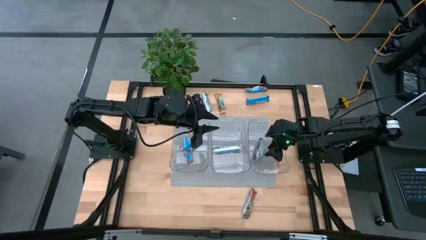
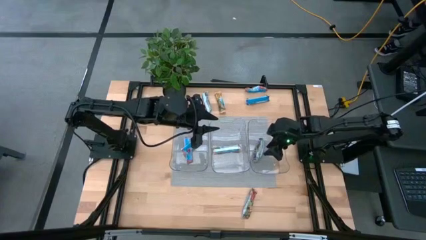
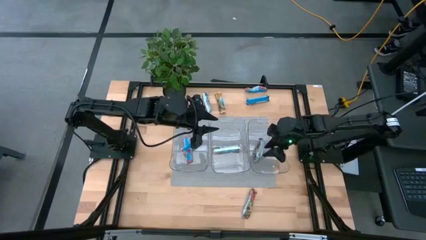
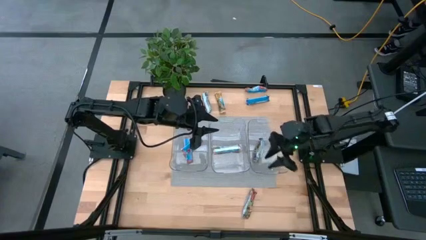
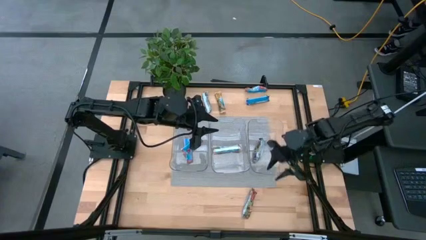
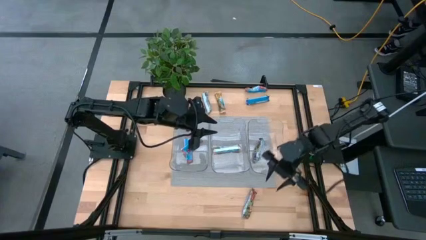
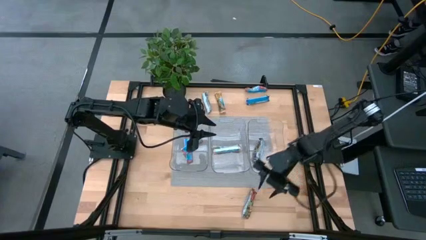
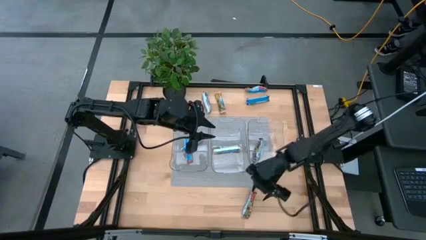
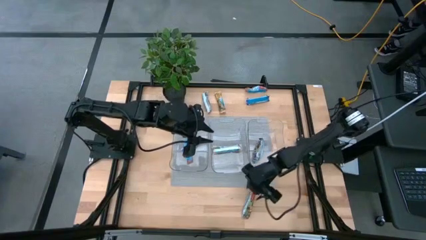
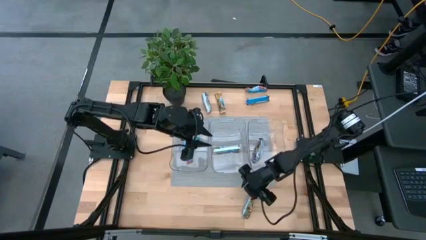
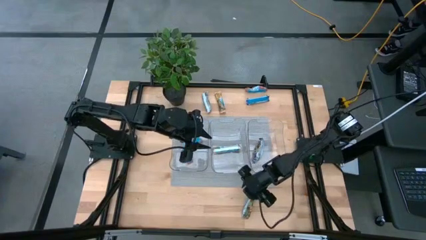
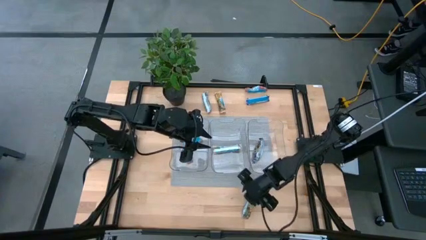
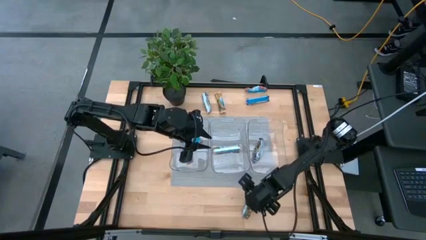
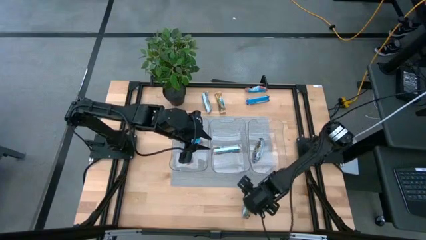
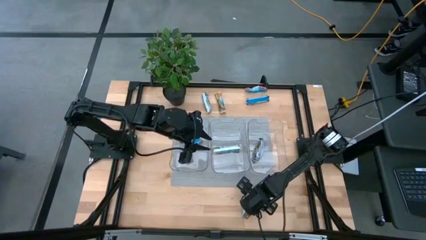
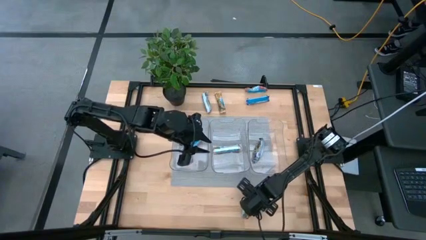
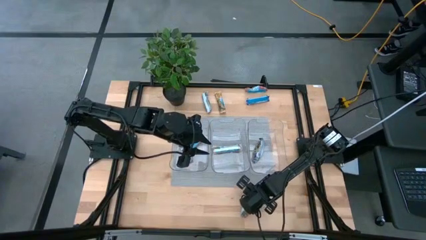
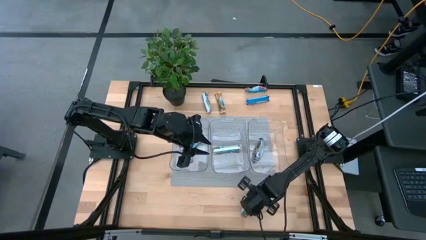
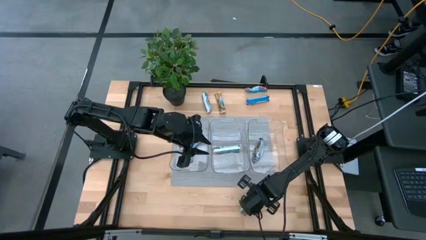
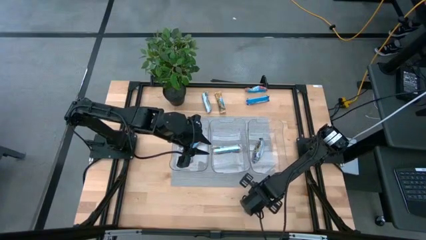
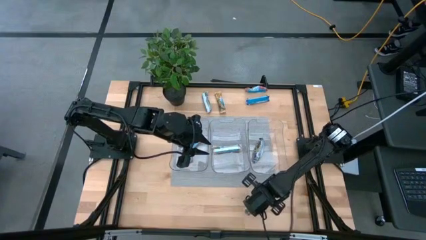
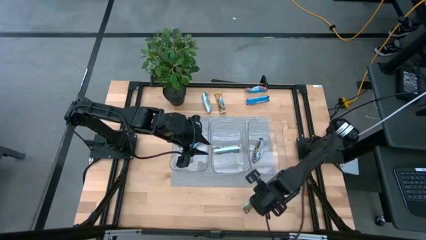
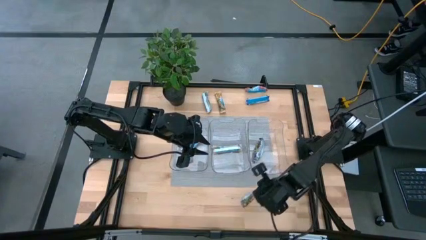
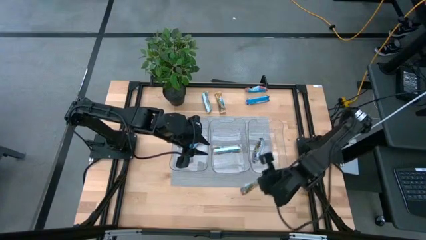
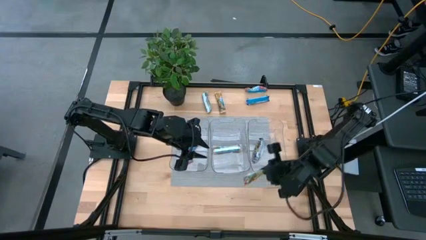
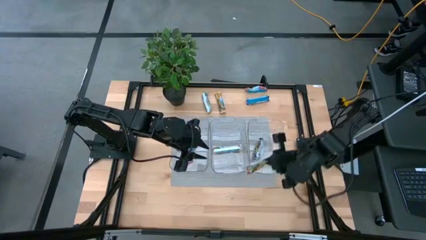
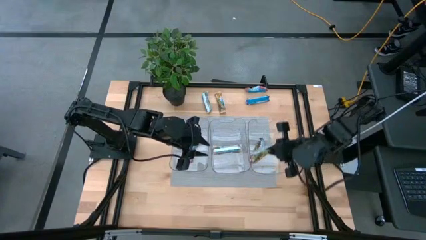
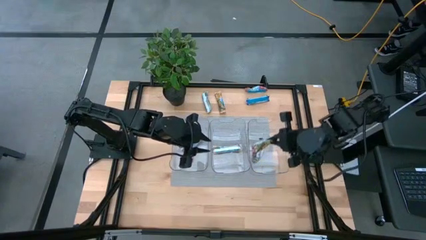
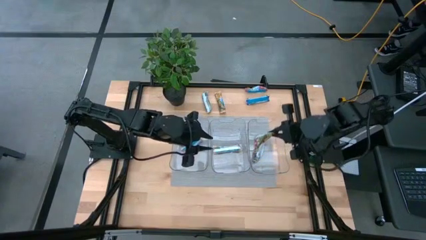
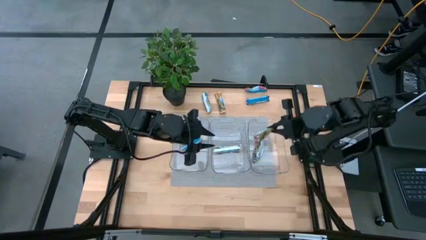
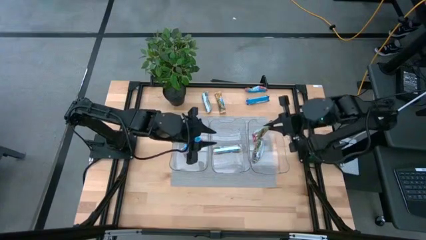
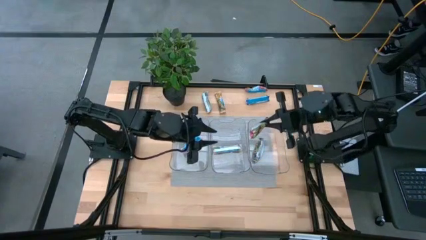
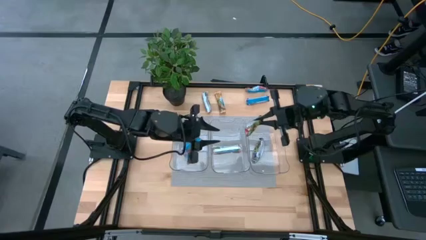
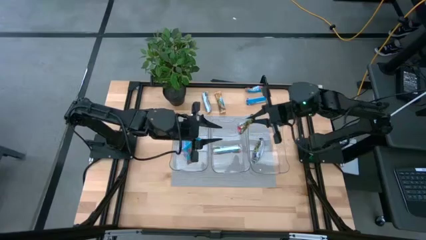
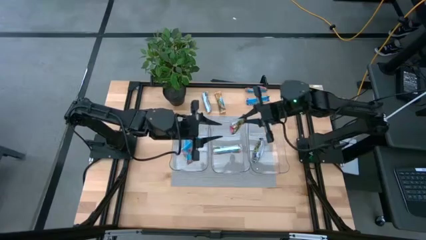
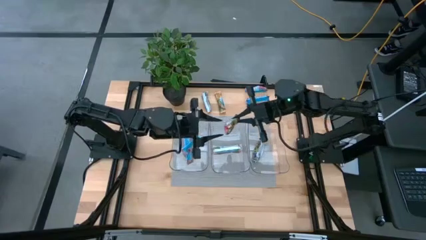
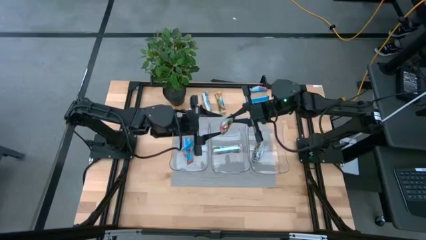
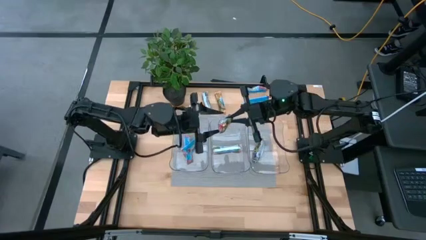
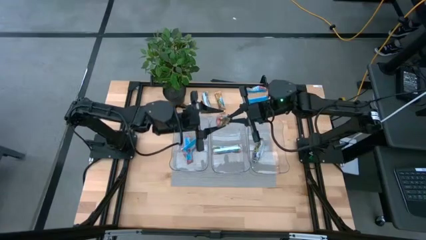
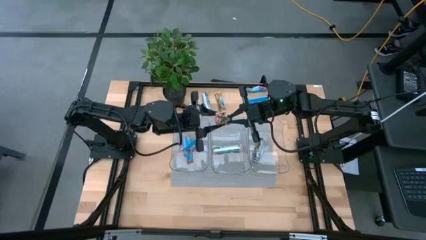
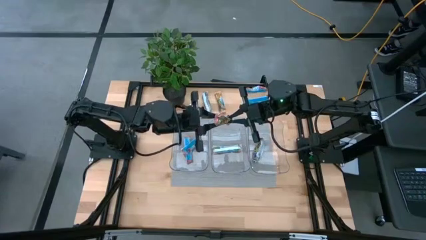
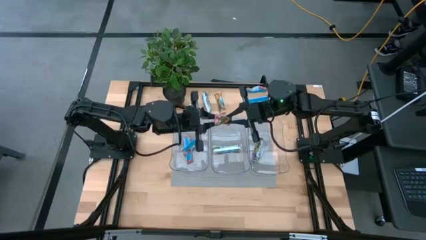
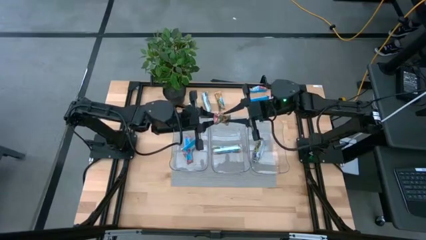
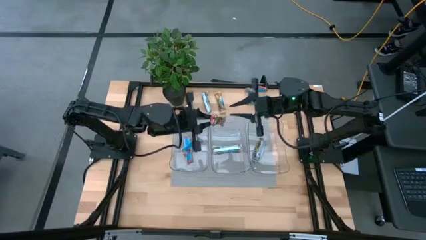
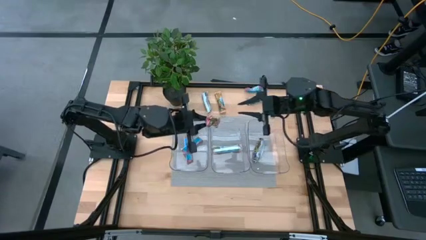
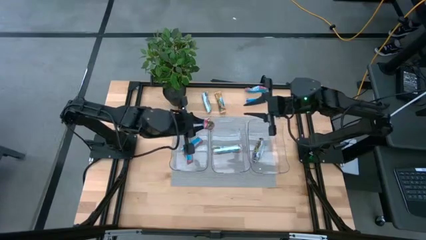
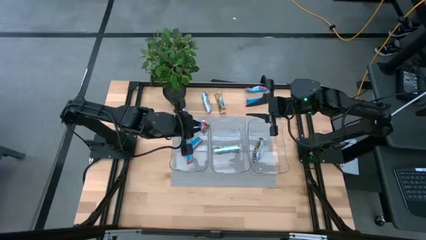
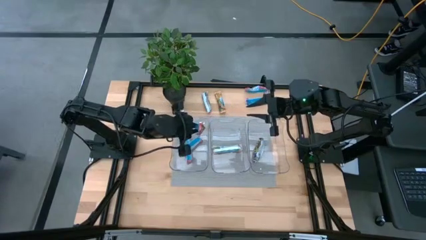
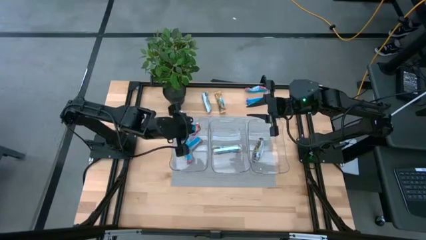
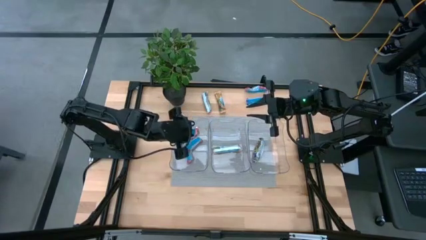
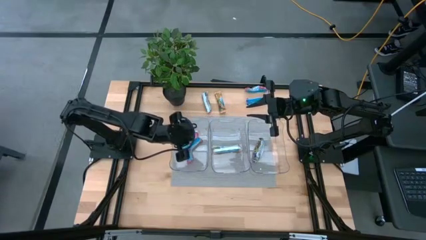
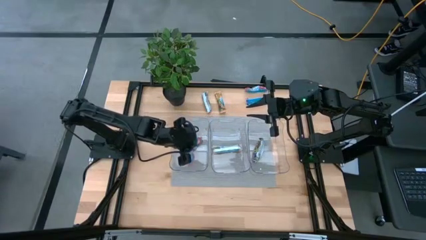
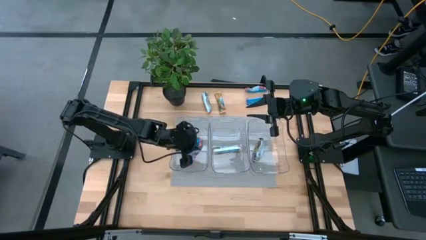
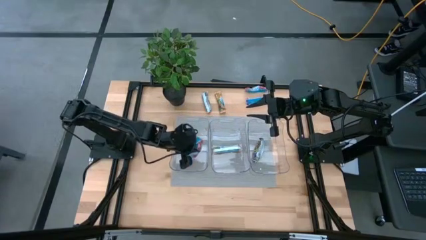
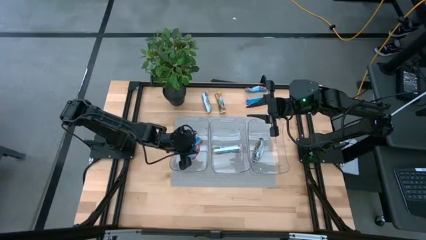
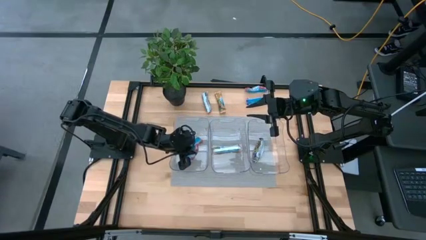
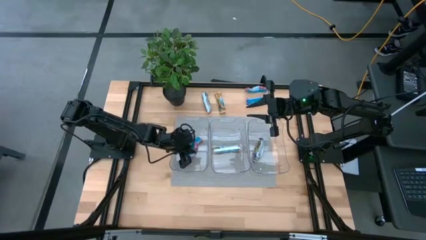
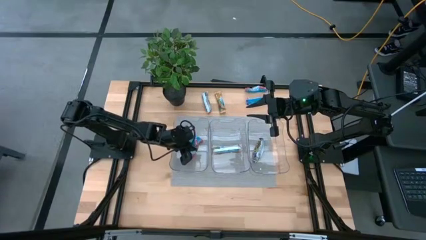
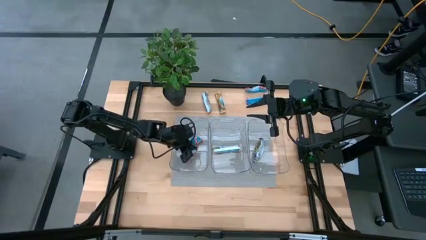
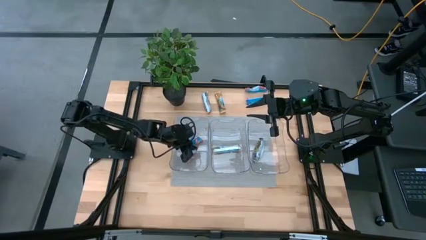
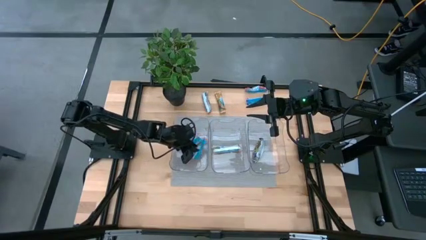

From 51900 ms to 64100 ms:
Task: Pick and place Granola Bars by type
Put the red granola bar into the left transparent bin

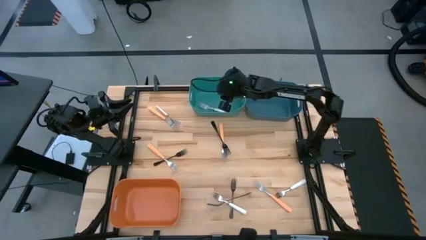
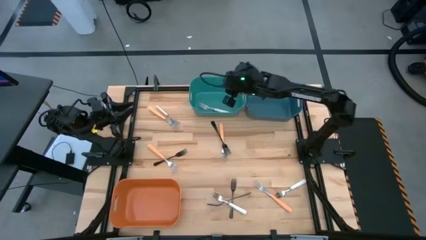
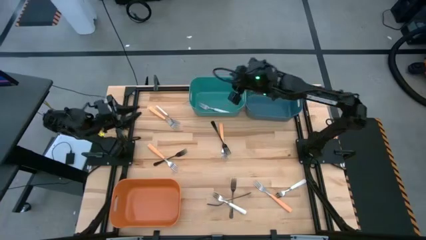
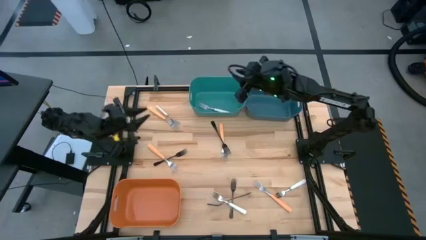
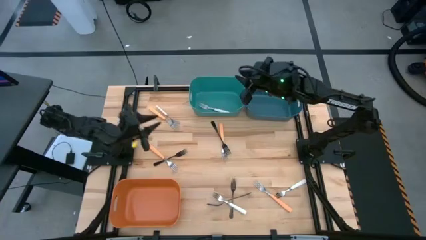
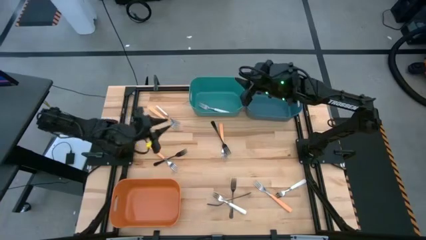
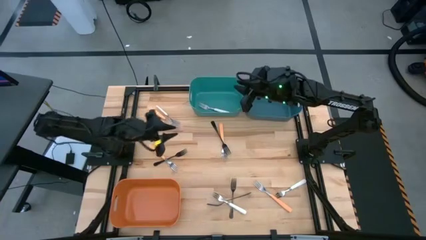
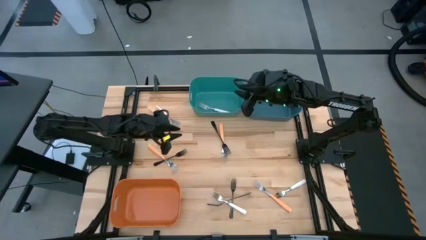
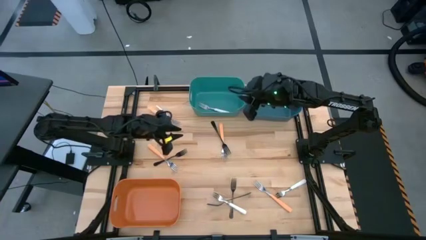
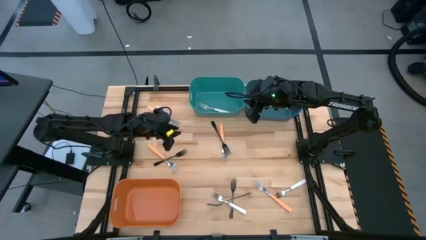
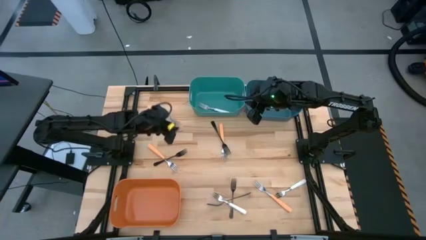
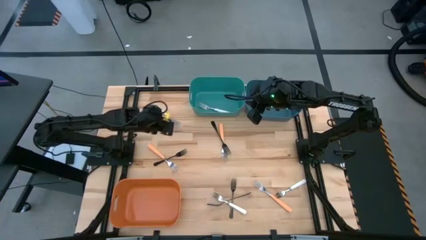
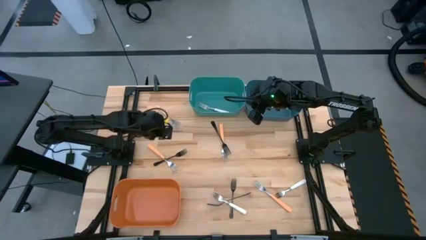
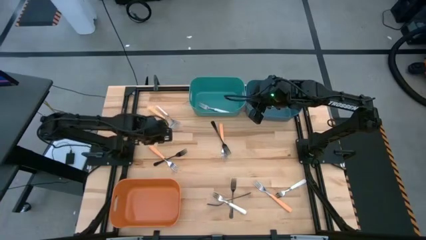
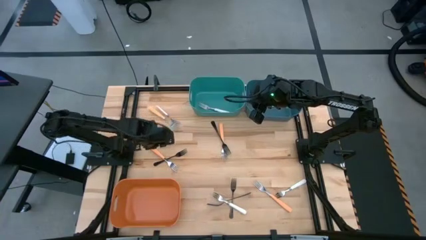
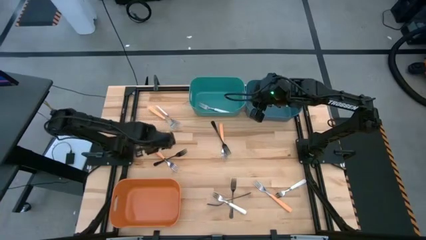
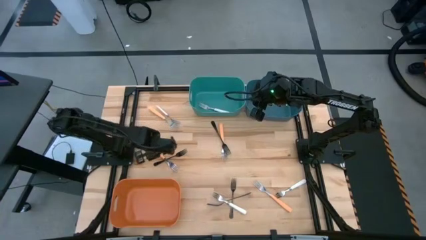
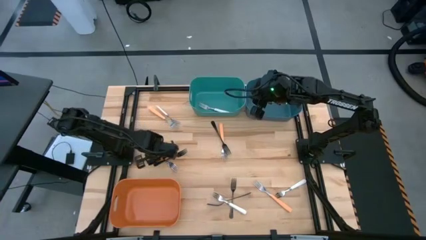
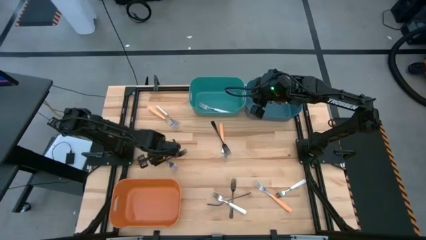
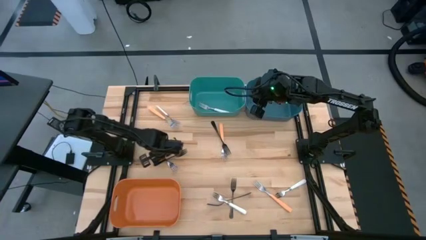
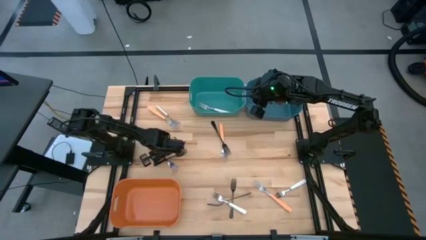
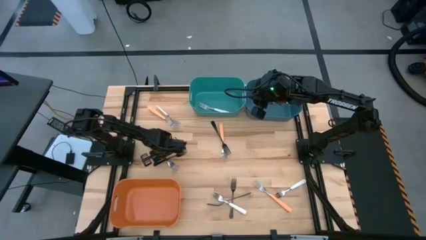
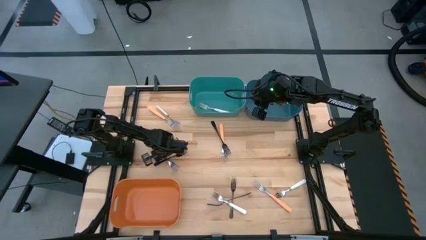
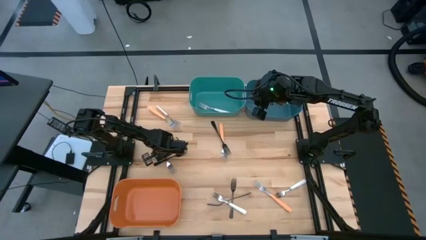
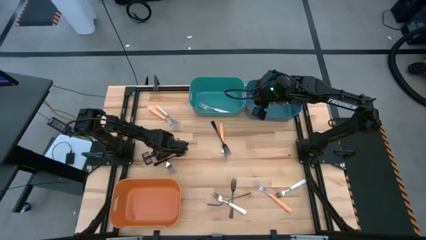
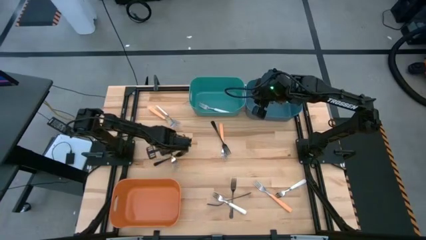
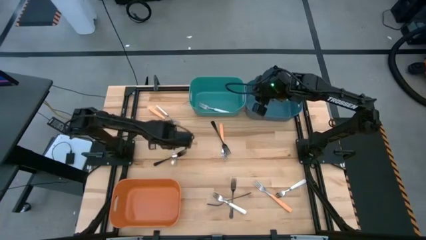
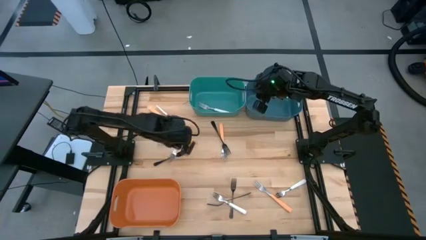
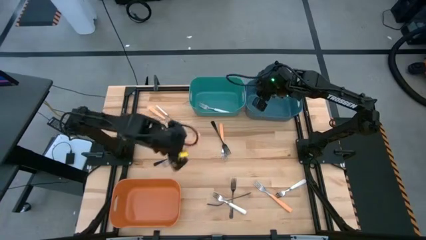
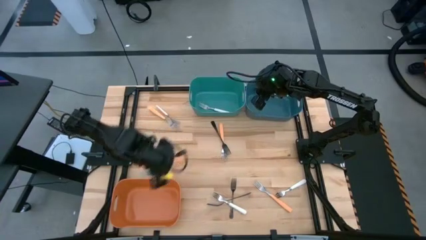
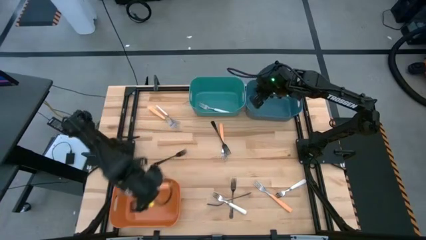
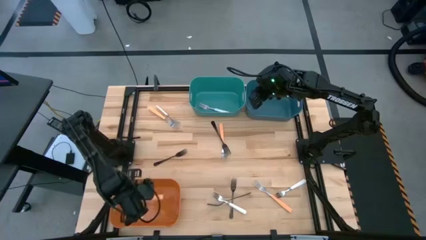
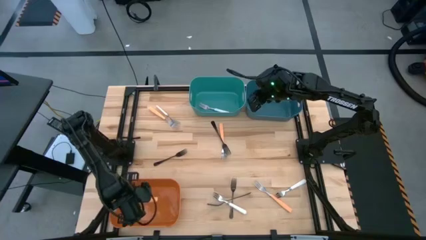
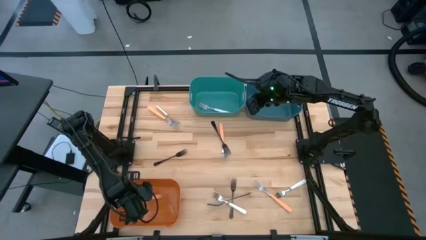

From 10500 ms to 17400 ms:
Task: Sort silverware by color (type)
Put the bottom left orange fork into the orange bin
